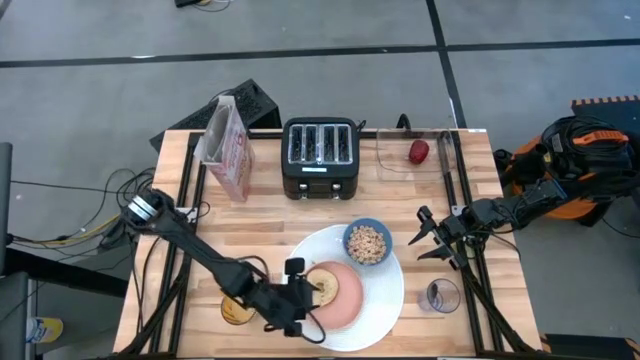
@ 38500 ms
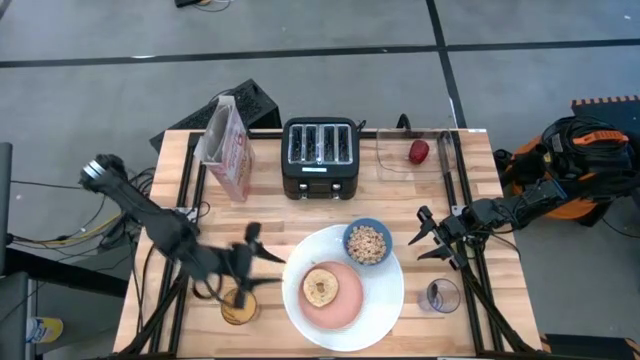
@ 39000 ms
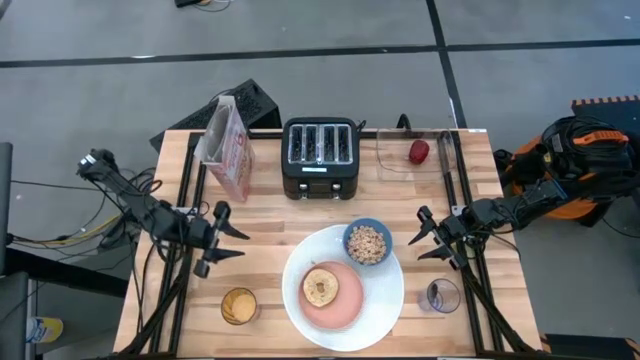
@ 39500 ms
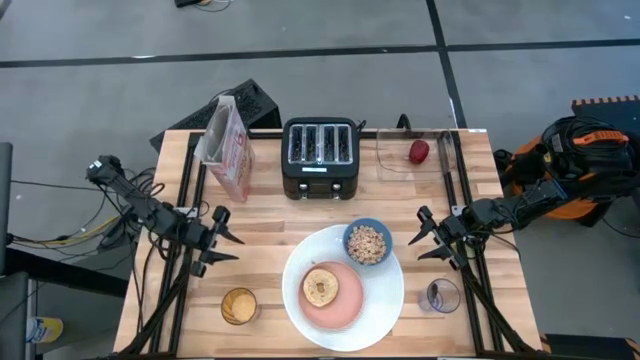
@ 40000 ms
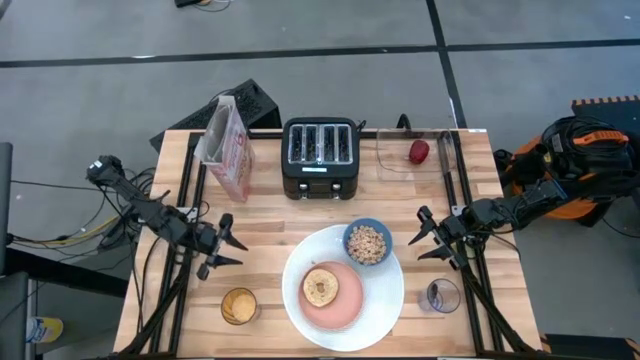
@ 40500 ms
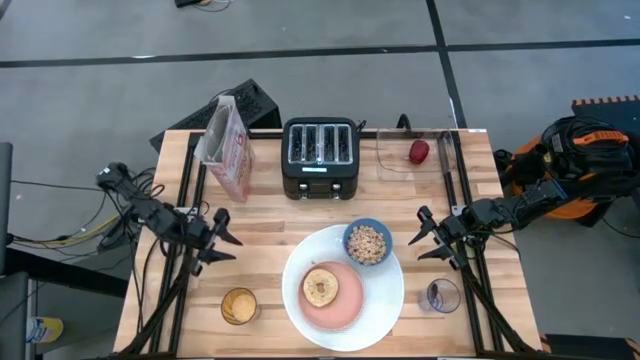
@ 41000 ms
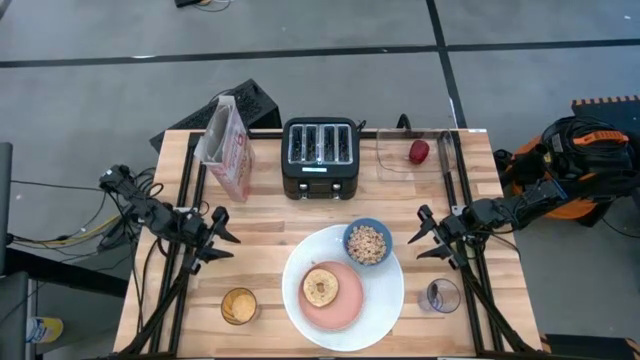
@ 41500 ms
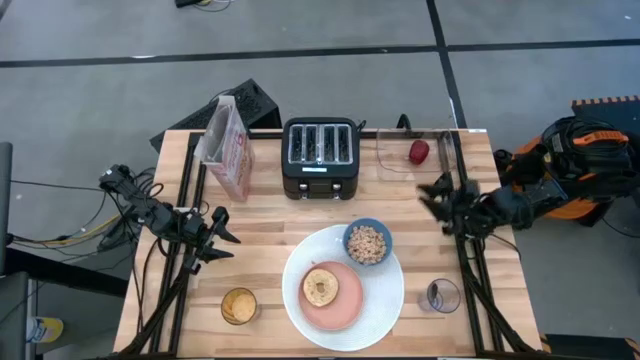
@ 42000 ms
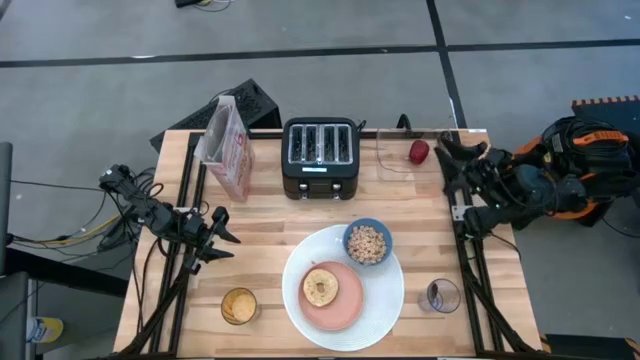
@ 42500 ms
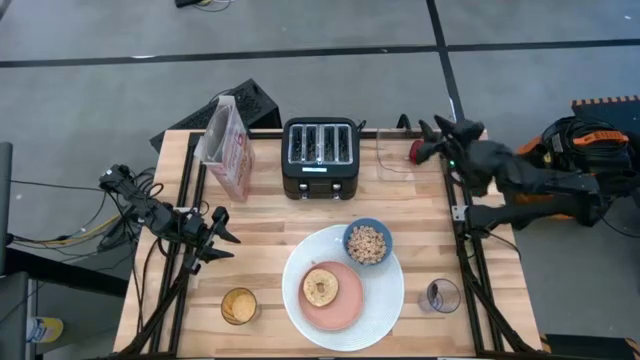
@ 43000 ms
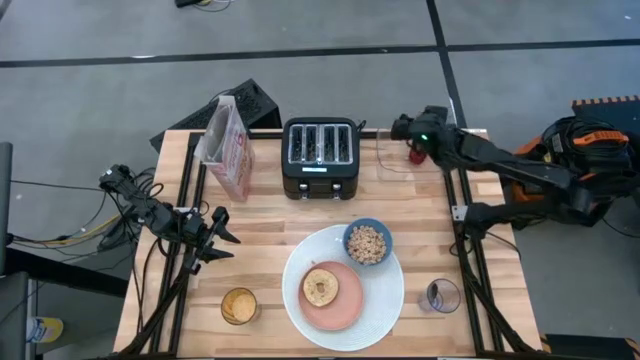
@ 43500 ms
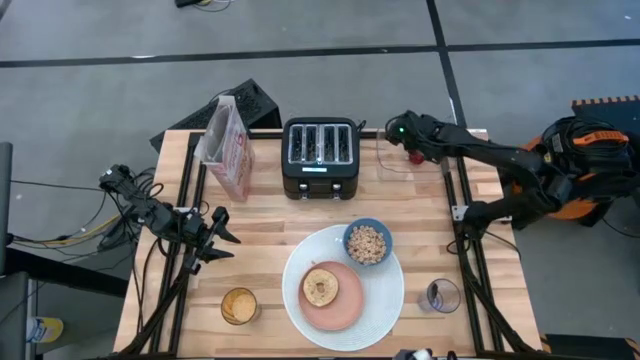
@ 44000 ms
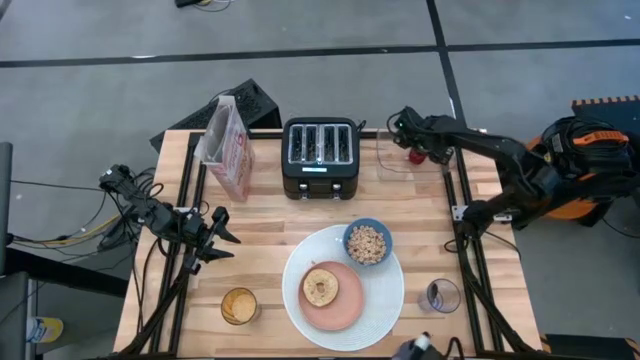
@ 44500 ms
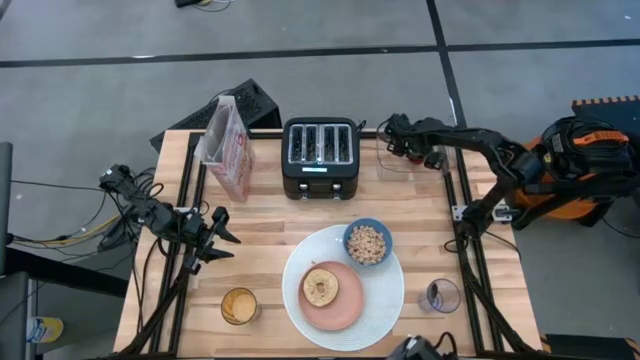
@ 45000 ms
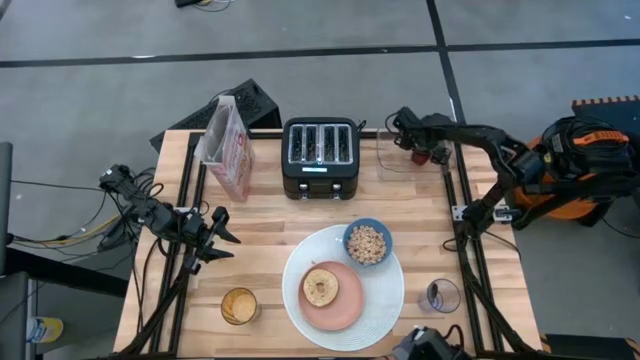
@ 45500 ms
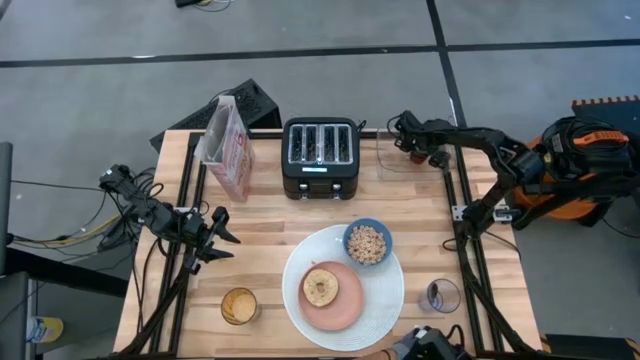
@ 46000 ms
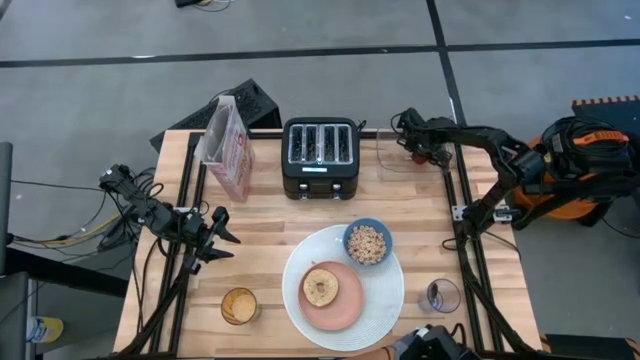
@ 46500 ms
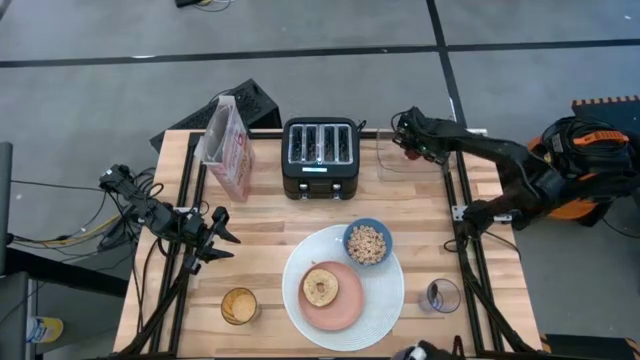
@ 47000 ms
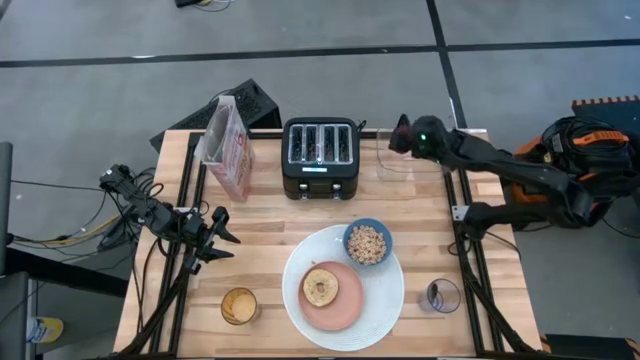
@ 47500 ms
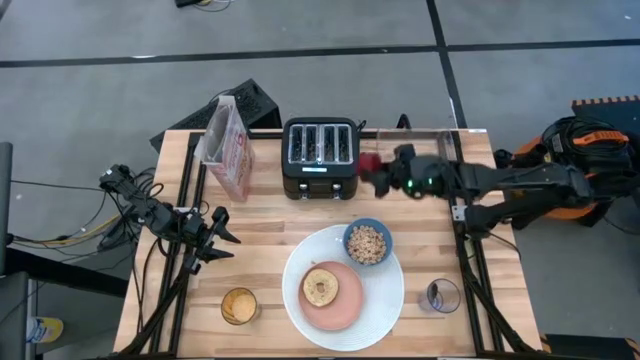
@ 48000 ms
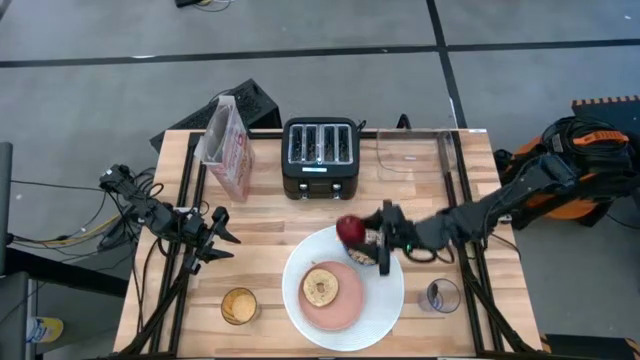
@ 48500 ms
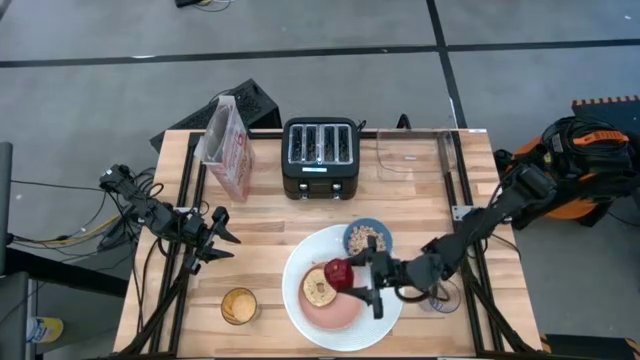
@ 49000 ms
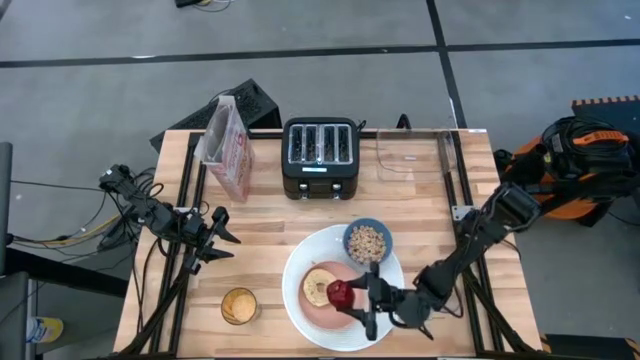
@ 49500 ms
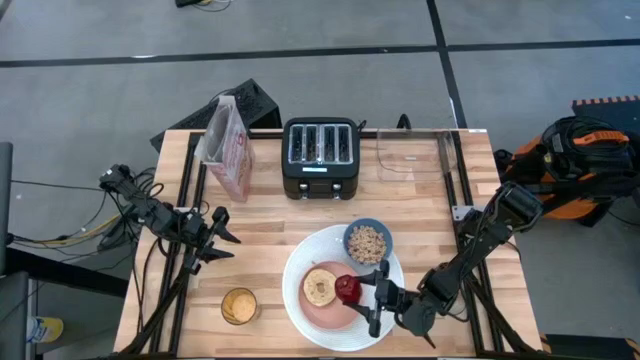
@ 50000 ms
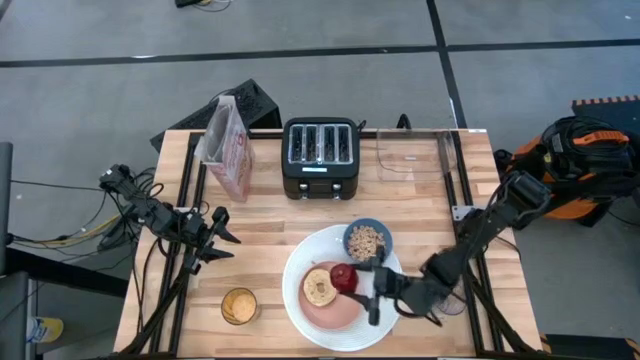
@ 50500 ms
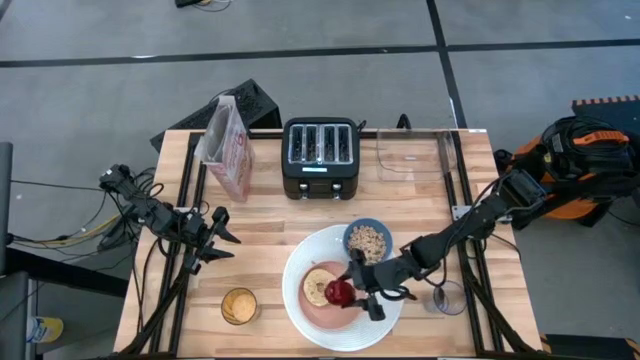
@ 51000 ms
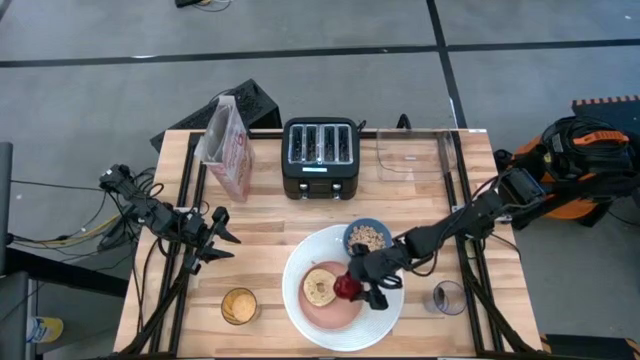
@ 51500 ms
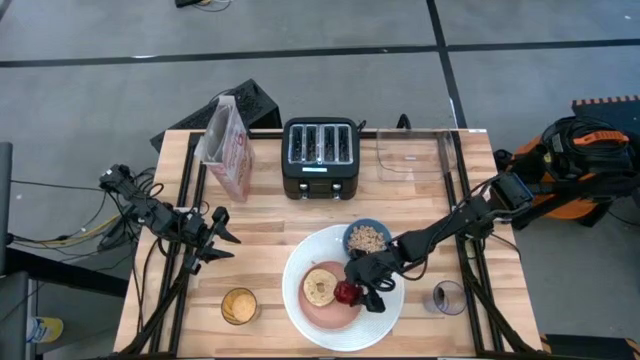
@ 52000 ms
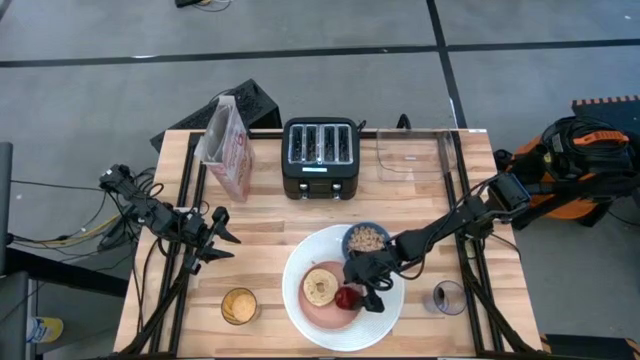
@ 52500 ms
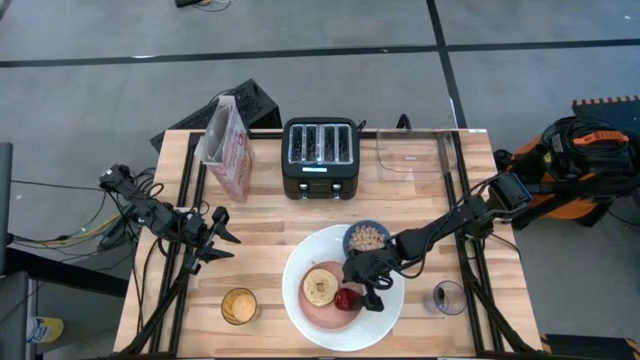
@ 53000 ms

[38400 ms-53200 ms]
Task: Arrange a breakfast setting
Remove the red apple from the transparent bin and put it on the pink plate

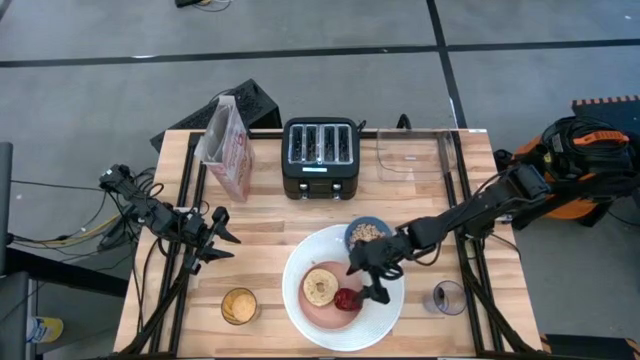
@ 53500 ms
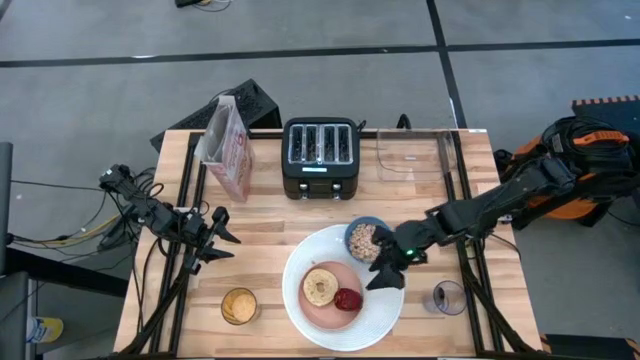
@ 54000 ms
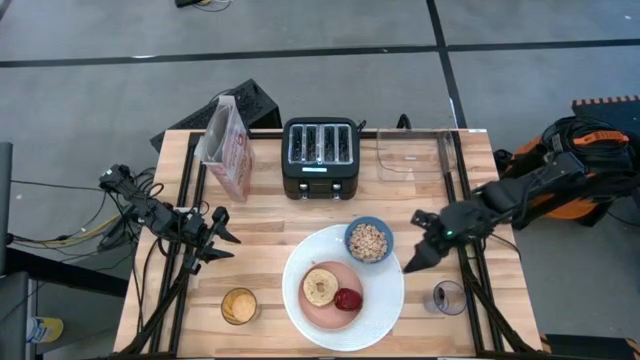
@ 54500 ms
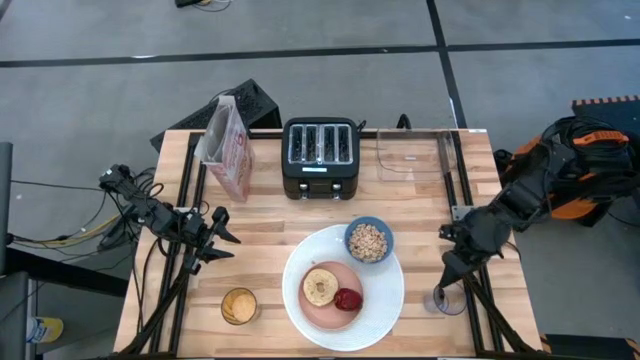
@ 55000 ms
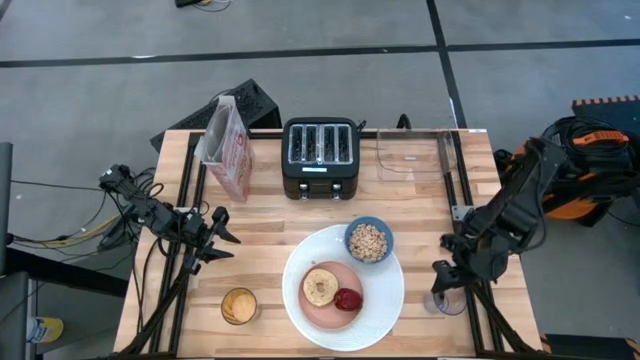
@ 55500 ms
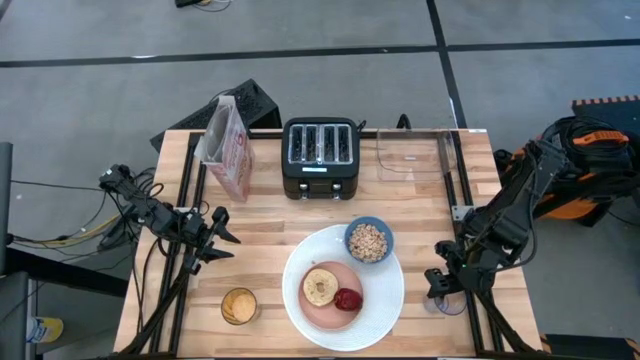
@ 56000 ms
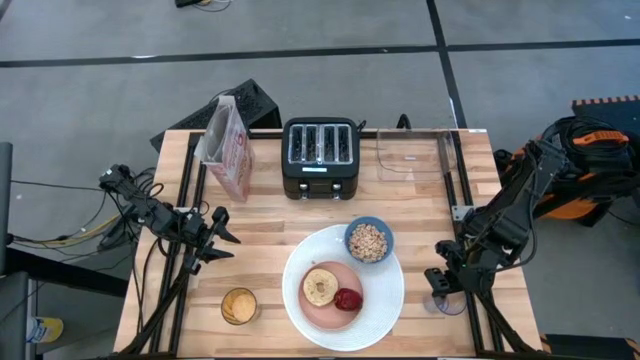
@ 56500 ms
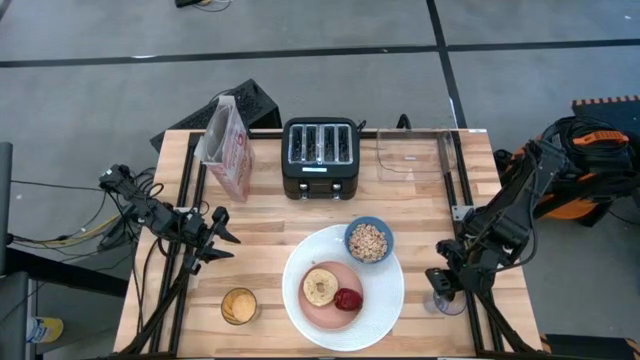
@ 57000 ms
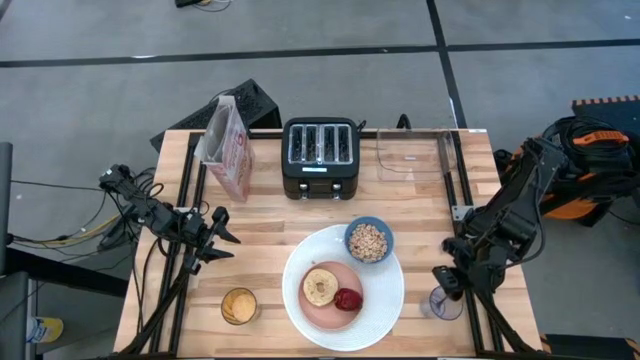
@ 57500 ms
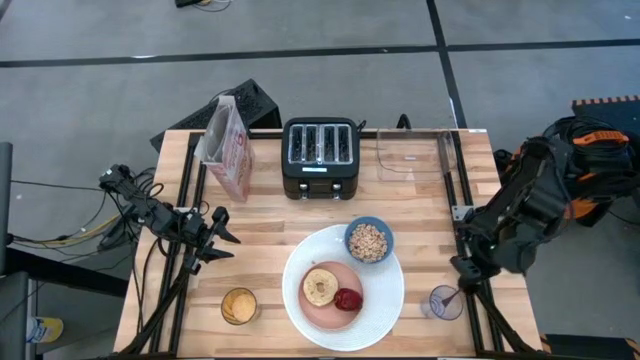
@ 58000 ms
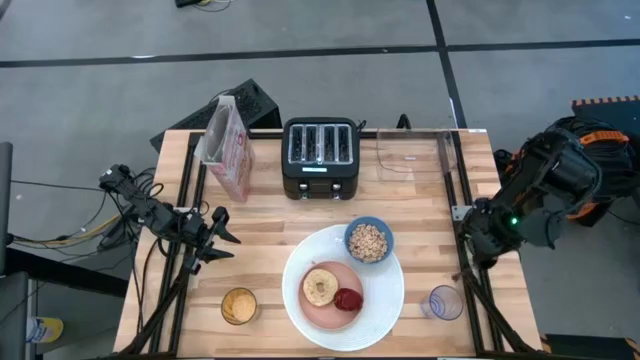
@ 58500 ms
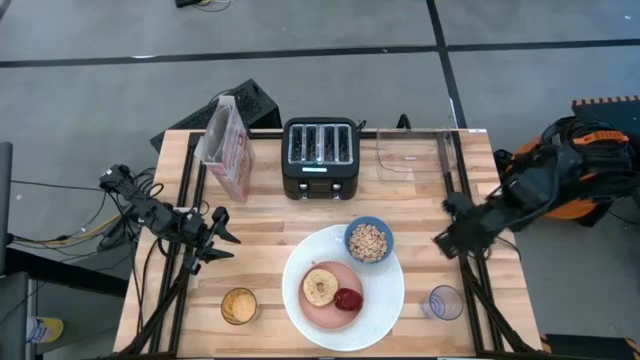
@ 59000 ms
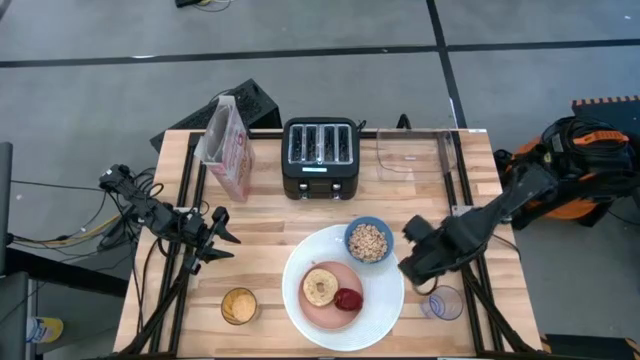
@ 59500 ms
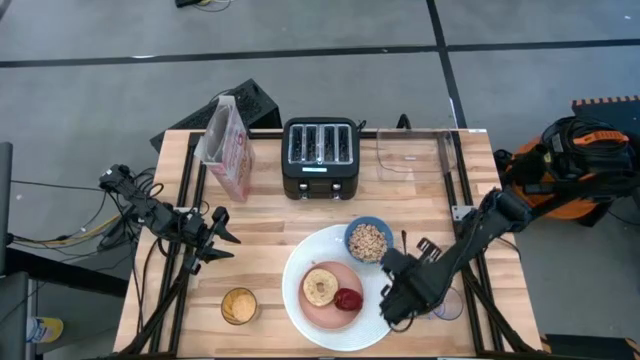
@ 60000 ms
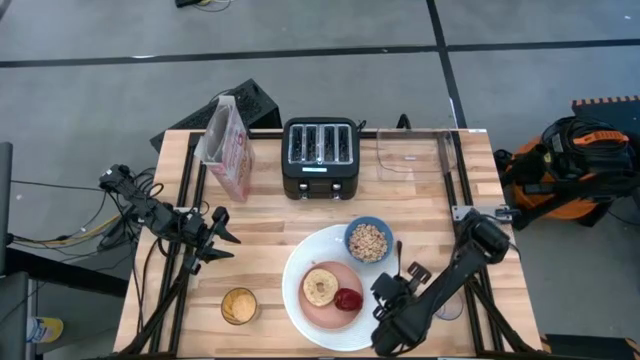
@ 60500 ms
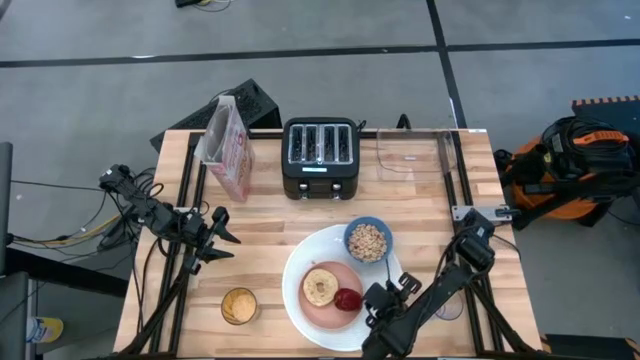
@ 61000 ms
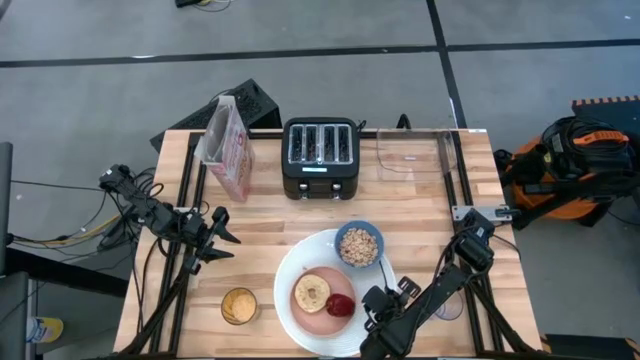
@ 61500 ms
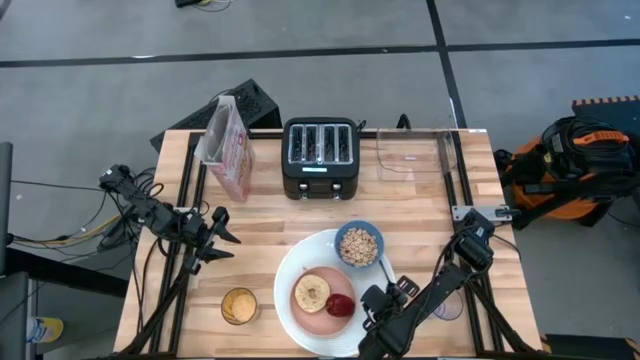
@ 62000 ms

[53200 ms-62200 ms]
Remove the silver spoon from the glass cup and place it on the right side of the white table mat
